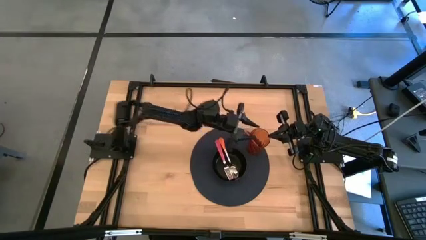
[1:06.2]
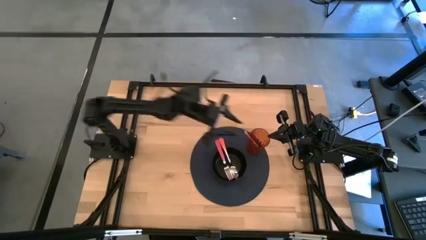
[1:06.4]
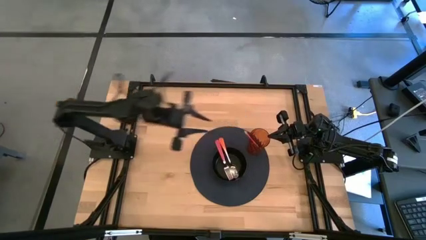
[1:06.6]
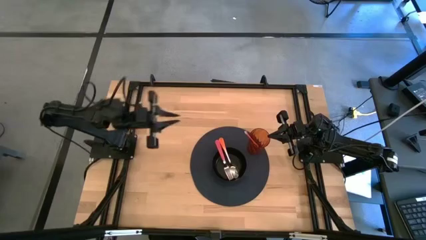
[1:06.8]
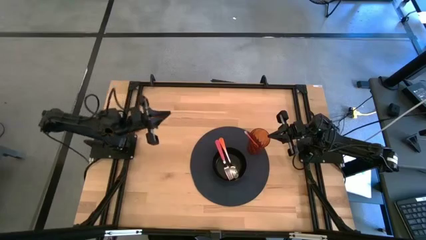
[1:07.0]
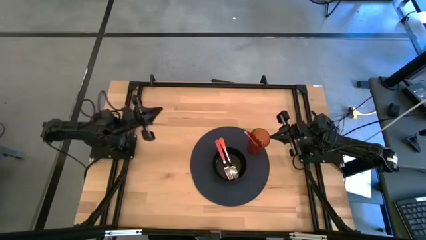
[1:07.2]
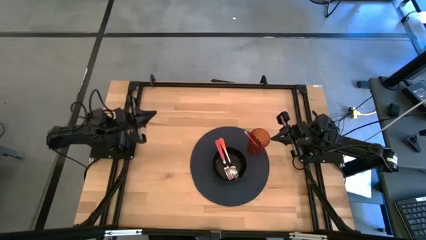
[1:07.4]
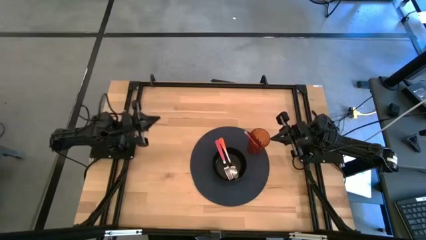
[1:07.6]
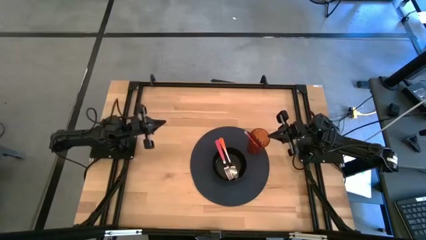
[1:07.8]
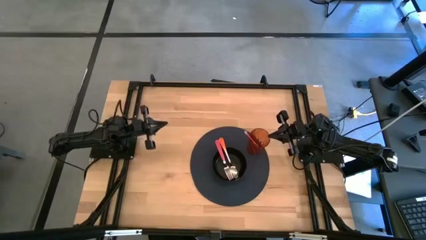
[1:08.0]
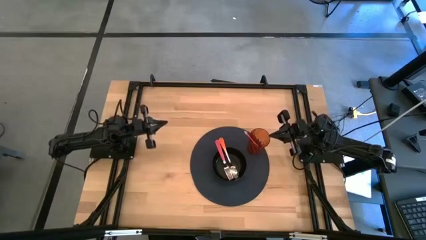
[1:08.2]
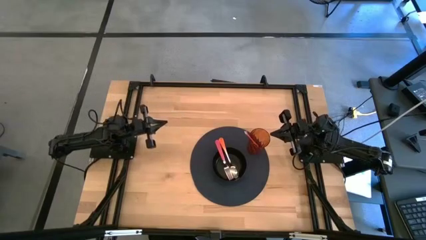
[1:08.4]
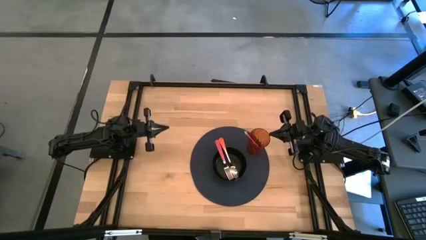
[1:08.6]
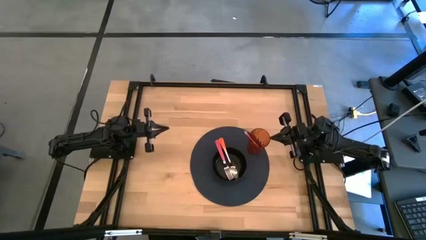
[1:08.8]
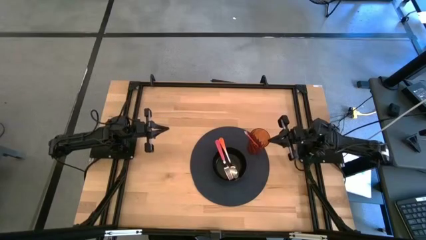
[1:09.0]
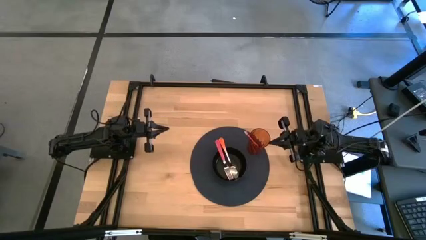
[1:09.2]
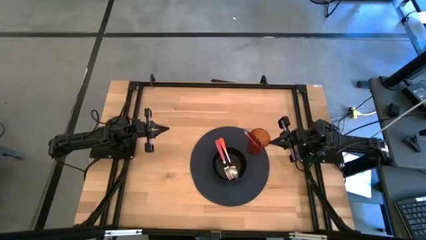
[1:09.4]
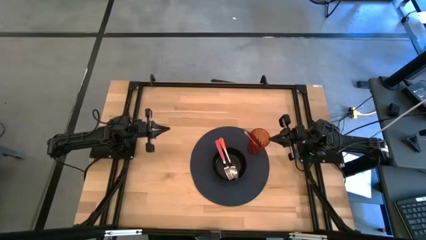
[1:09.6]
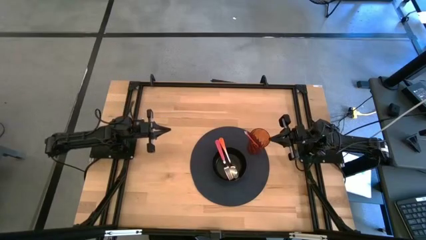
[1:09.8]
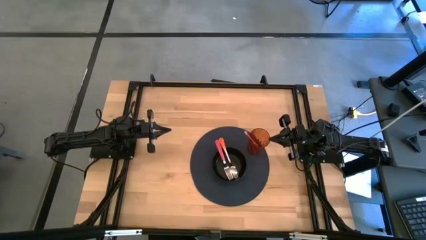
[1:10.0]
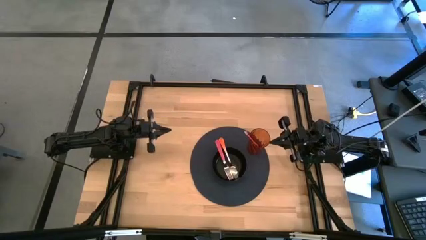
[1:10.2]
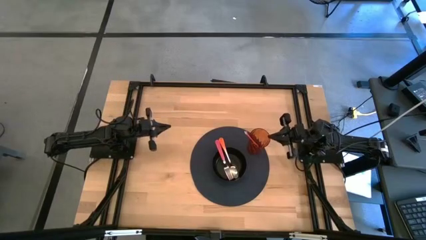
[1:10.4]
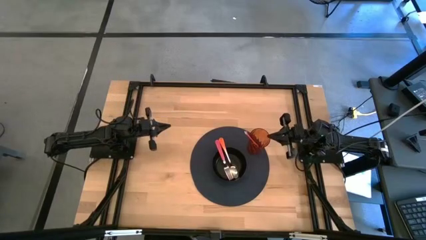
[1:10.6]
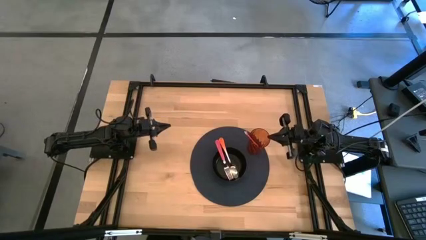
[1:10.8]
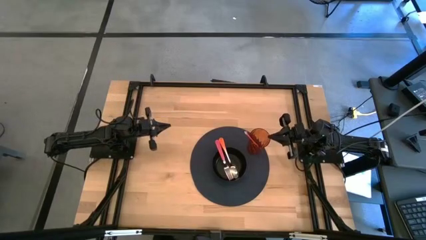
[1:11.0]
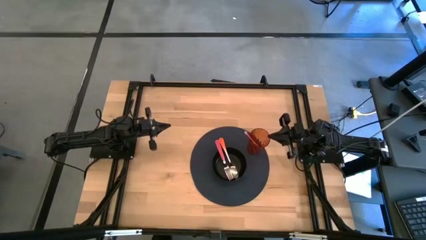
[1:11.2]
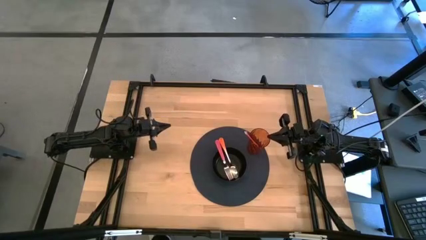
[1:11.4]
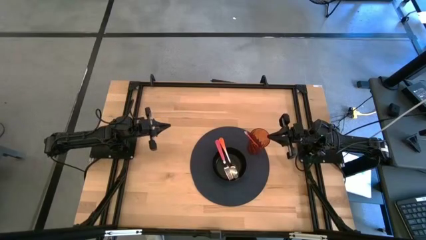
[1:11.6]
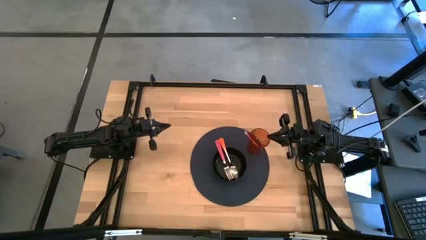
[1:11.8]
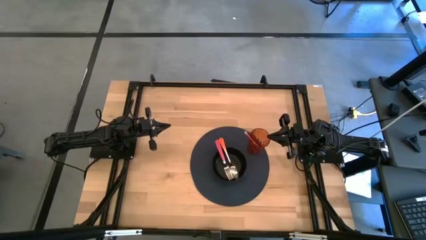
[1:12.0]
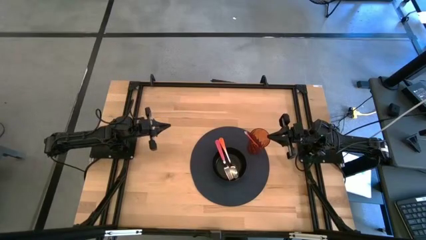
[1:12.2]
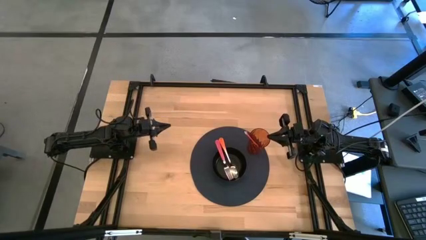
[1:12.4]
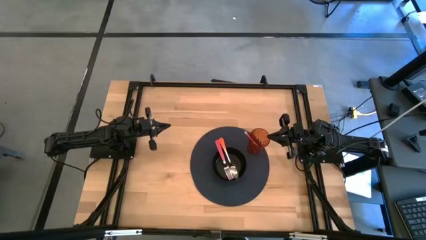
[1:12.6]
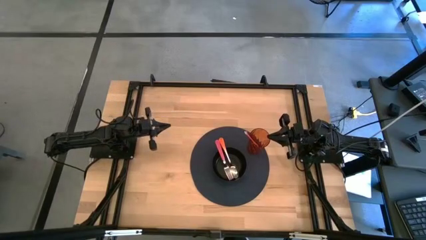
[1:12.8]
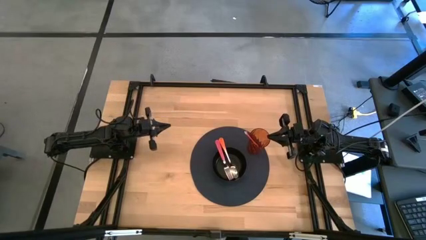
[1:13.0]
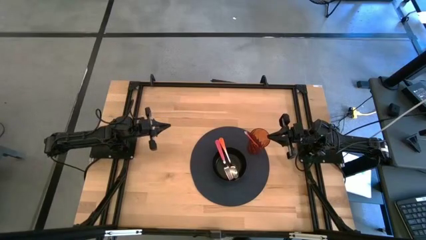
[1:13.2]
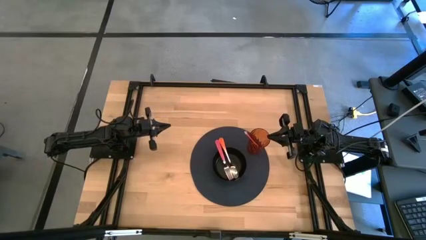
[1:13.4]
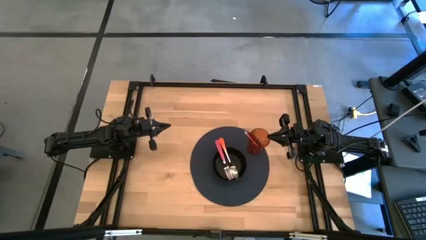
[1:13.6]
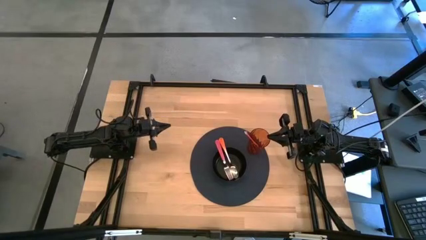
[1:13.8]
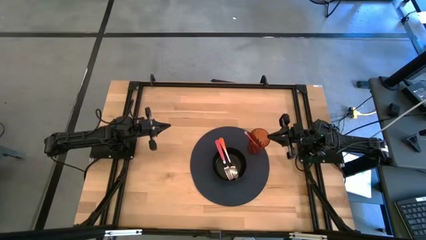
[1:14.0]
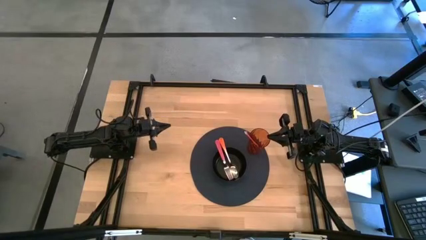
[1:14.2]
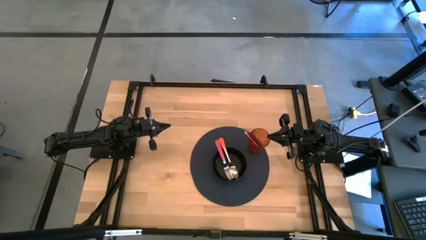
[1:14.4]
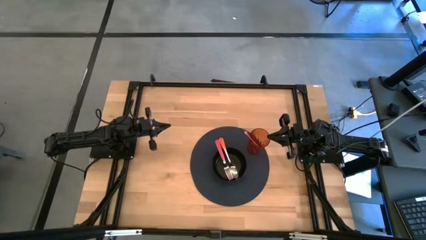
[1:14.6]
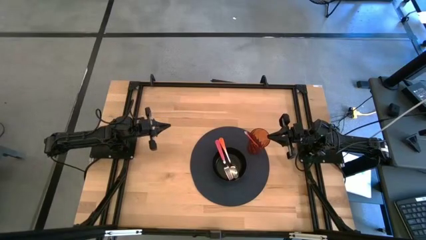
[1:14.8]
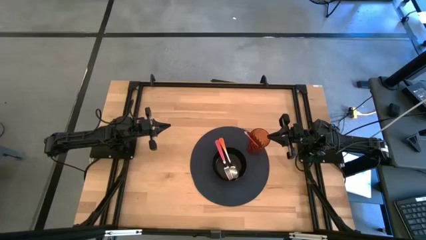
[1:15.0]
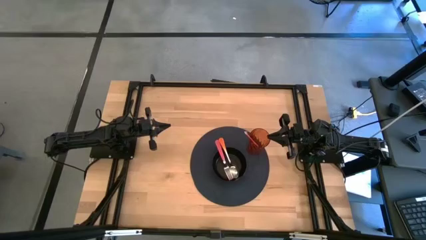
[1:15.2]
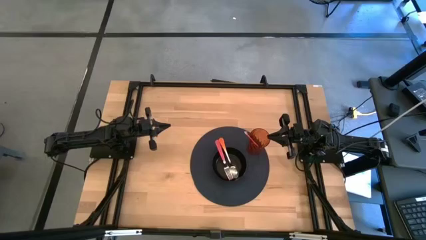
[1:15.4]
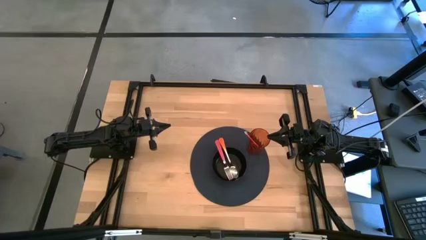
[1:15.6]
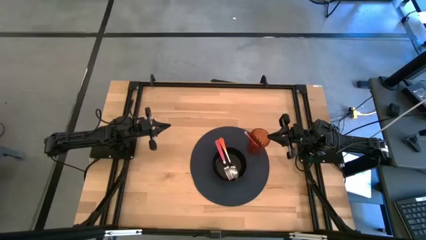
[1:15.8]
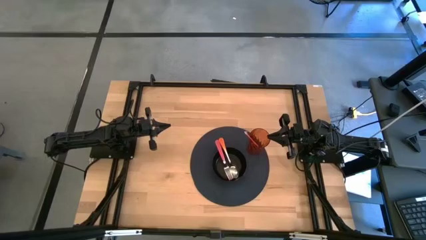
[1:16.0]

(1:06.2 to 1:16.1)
Task: Pick & Place Utensil
Return to Home Position

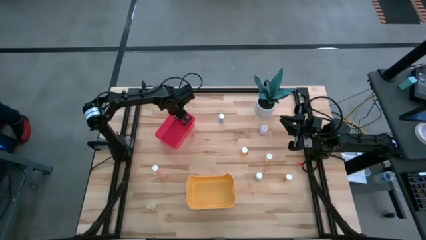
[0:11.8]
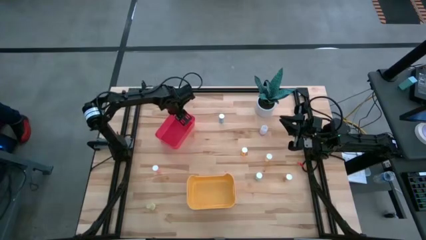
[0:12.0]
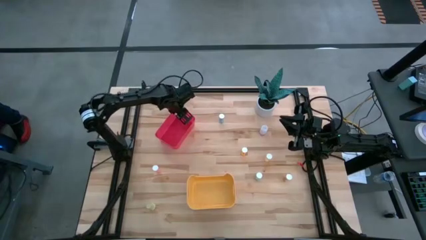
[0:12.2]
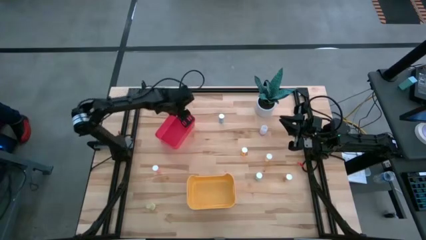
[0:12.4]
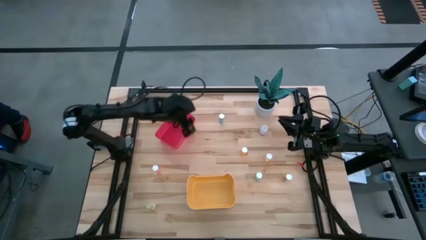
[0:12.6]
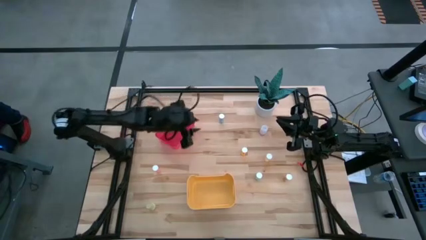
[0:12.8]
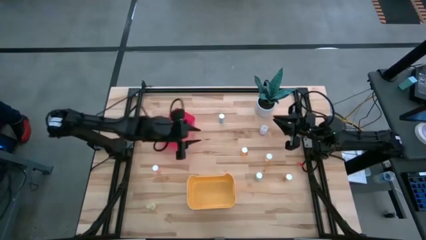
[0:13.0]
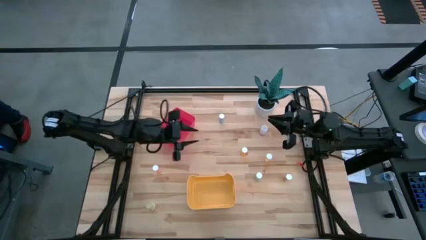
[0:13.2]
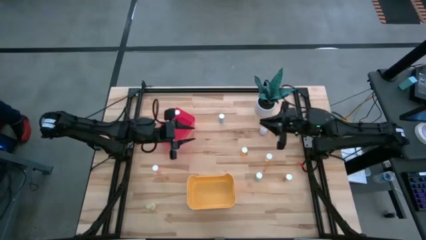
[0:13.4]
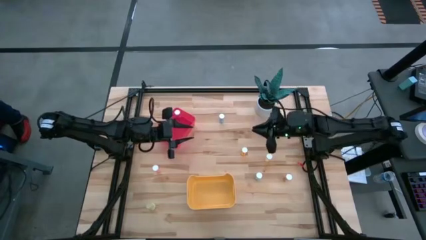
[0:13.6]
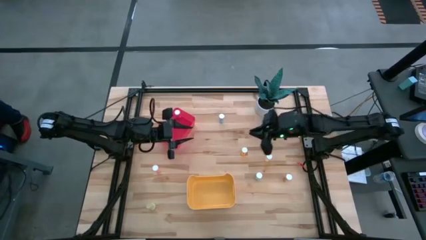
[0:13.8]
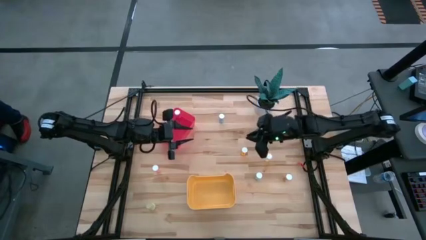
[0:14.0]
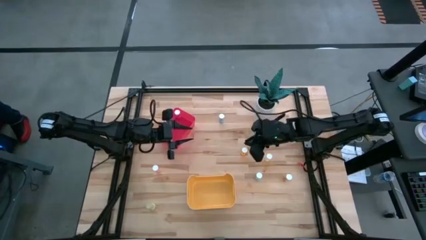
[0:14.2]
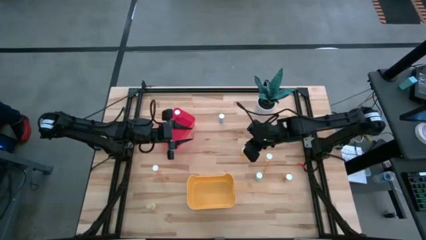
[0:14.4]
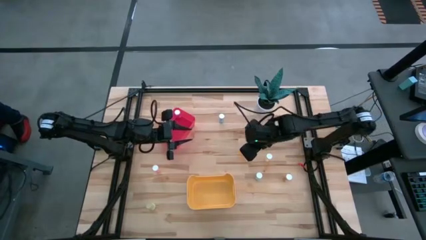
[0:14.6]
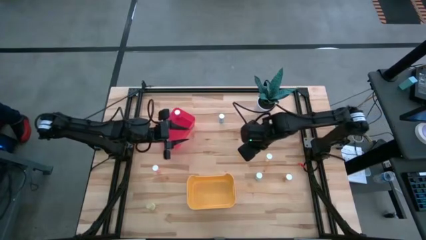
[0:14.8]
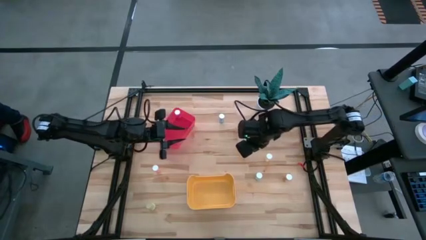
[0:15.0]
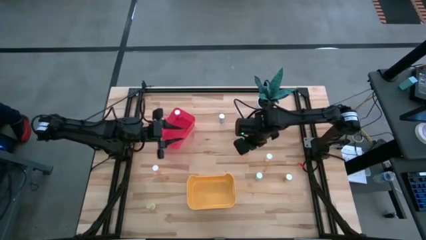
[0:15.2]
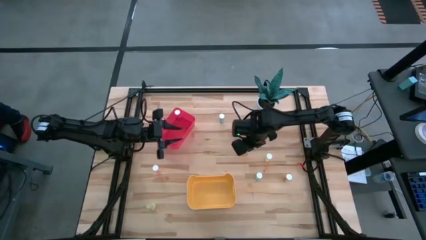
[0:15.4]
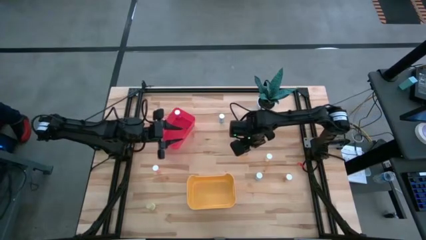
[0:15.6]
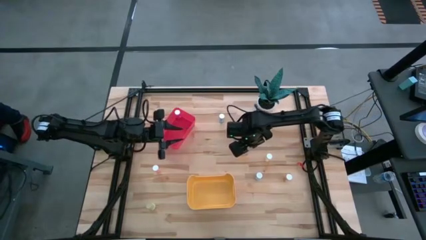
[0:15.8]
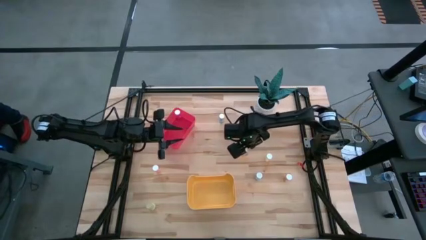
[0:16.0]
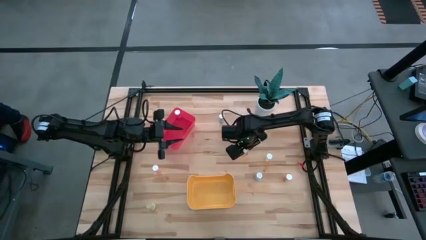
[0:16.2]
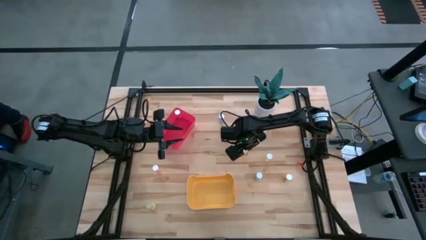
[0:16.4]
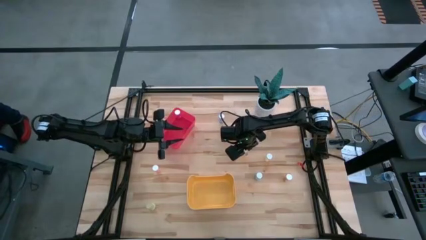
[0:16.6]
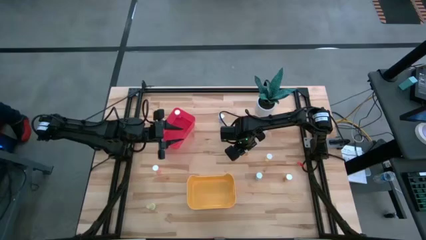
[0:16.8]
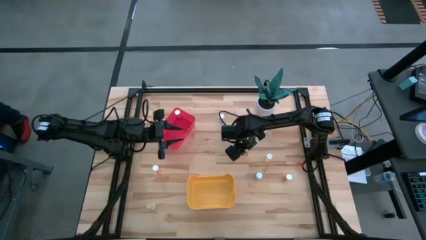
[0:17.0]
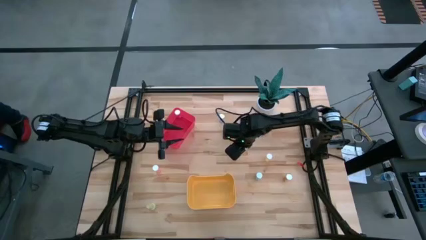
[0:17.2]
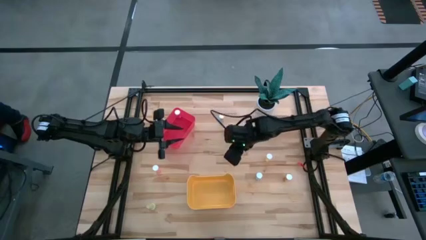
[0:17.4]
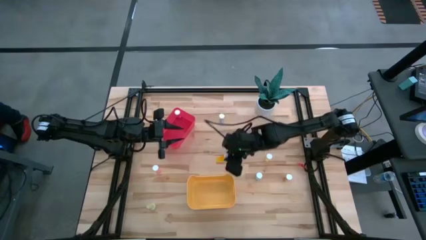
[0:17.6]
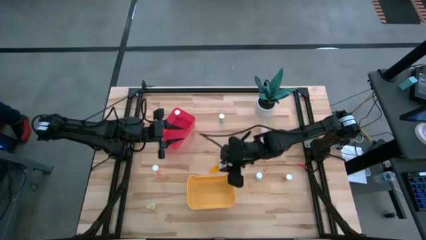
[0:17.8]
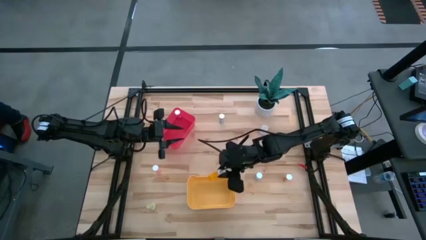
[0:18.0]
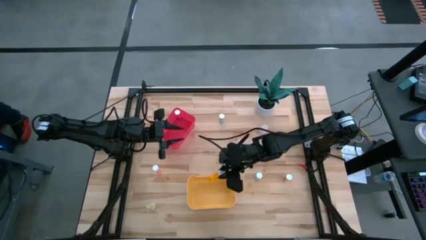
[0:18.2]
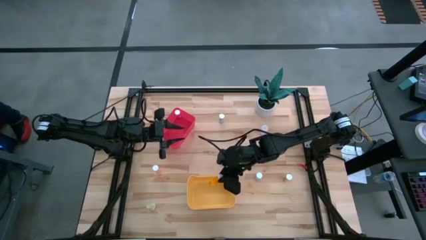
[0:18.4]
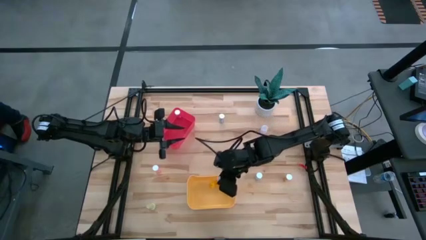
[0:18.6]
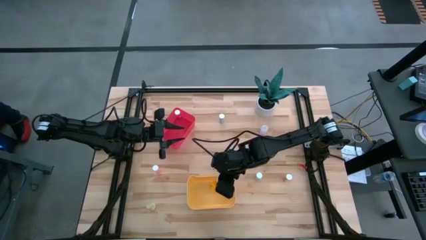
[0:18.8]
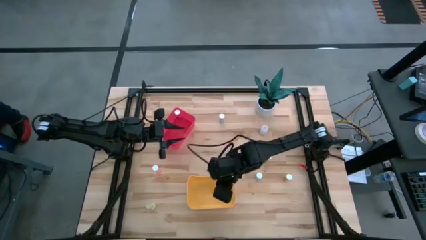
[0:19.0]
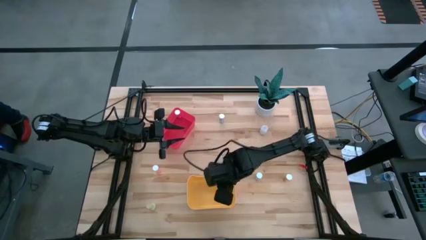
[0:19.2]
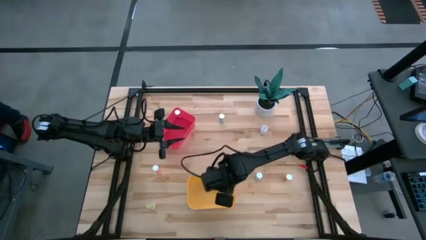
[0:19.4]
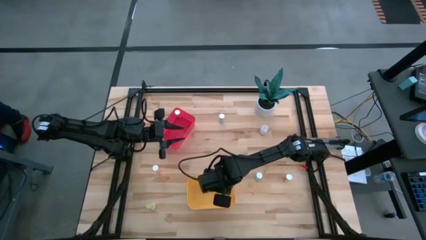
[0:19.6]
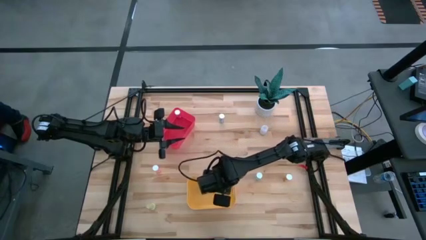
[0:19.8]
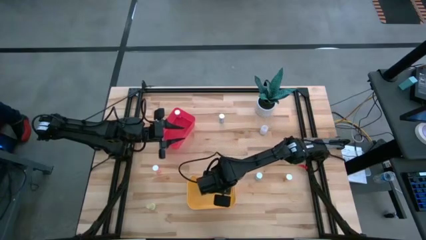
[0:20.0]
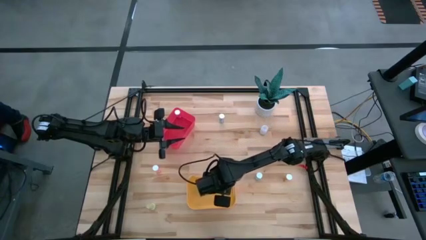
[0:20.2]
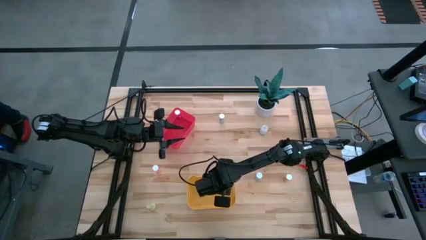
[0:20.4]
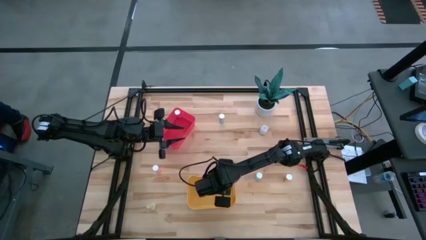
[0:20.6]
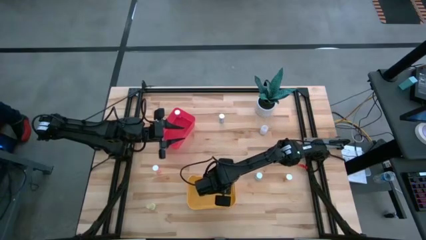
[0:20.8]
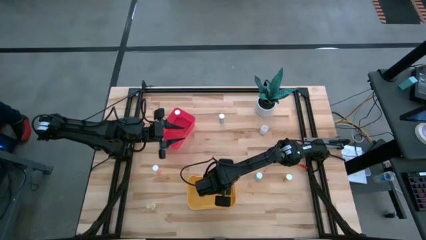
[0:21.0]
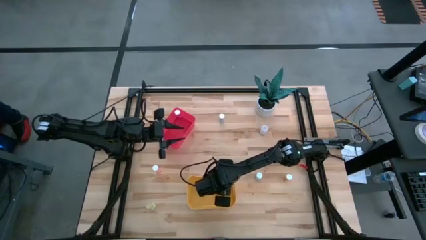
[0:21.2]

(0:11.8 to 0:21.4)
Task: Pick and place medicine bottles into bin by pill shape (circle, oval)
Put the orange tablet bottle into the yellow bin
